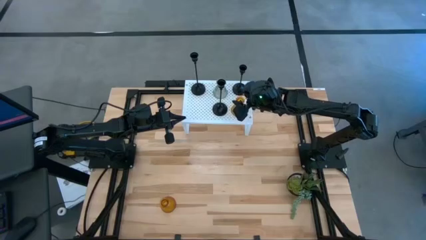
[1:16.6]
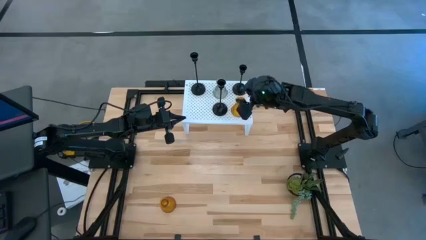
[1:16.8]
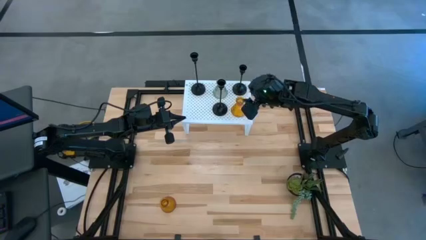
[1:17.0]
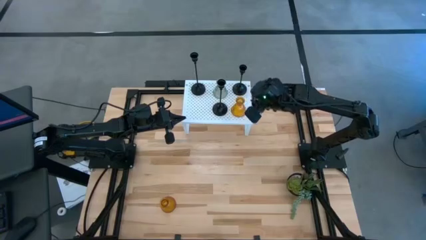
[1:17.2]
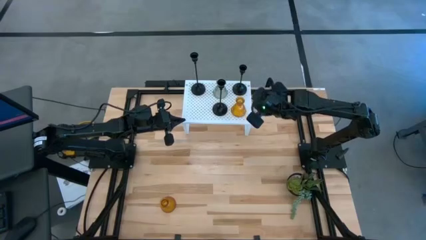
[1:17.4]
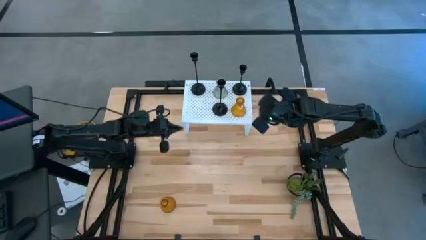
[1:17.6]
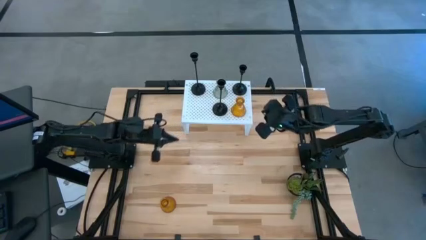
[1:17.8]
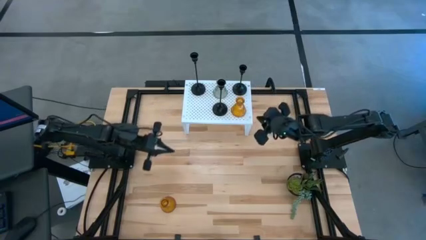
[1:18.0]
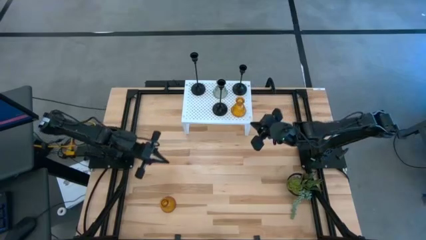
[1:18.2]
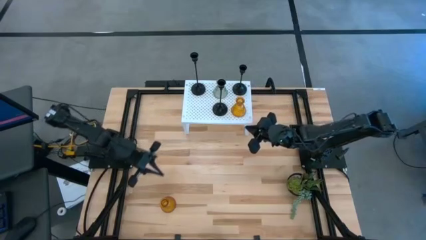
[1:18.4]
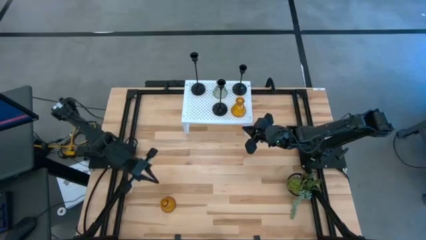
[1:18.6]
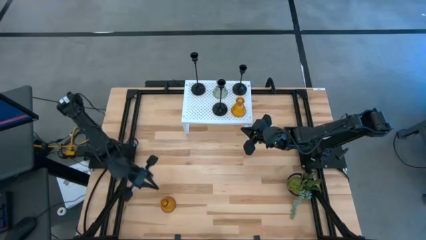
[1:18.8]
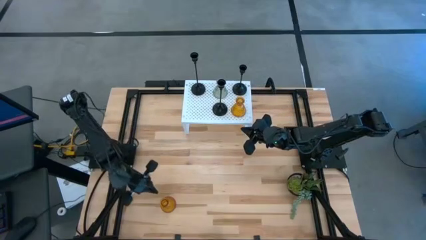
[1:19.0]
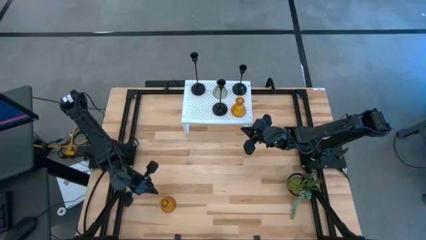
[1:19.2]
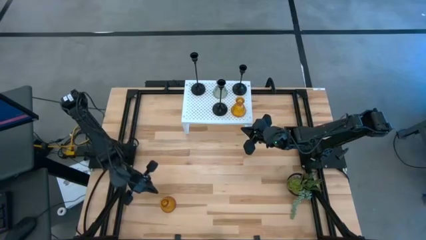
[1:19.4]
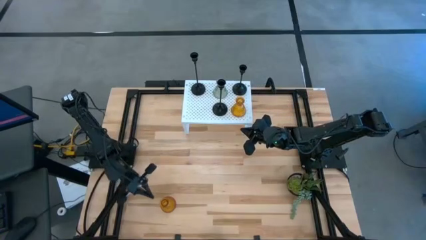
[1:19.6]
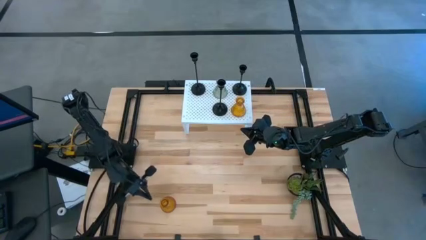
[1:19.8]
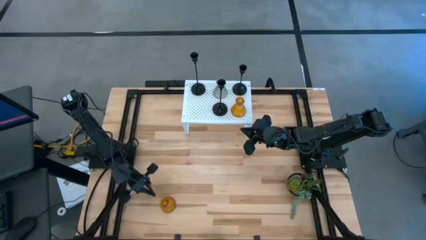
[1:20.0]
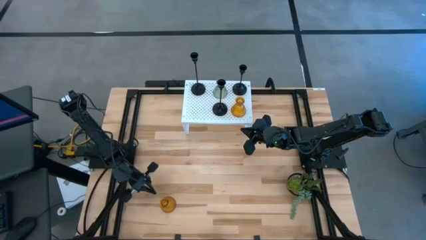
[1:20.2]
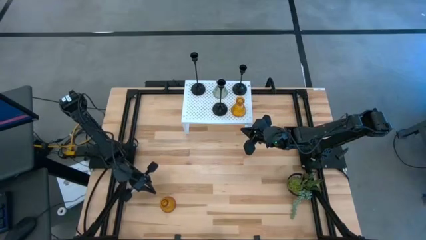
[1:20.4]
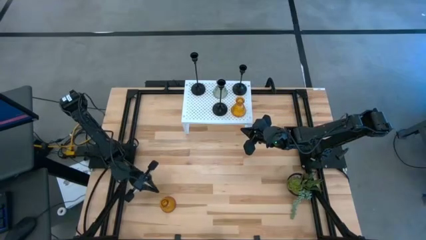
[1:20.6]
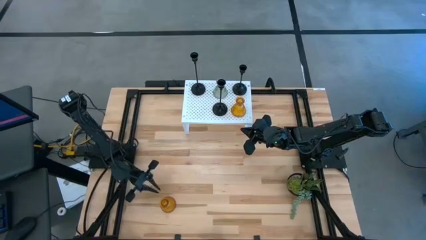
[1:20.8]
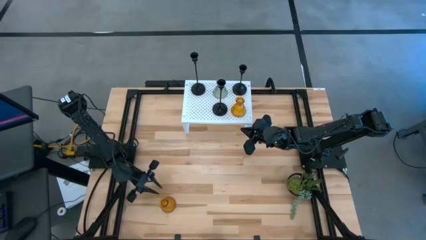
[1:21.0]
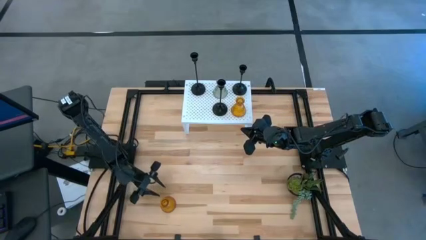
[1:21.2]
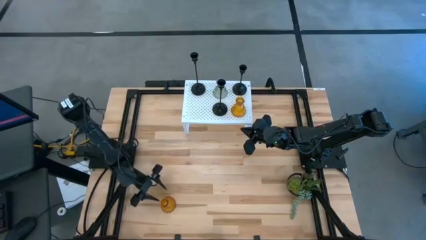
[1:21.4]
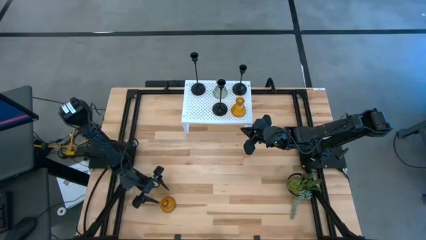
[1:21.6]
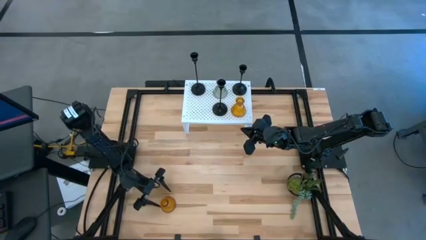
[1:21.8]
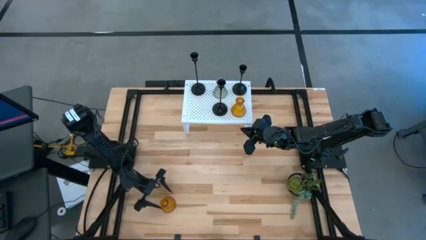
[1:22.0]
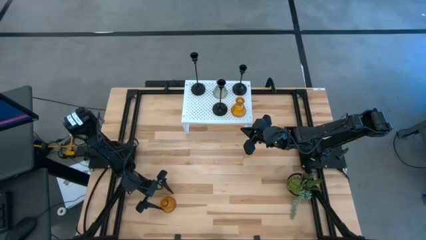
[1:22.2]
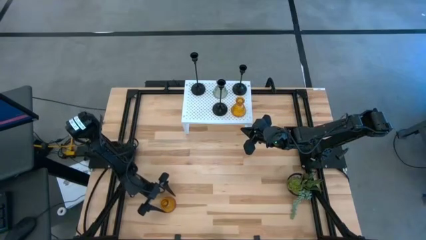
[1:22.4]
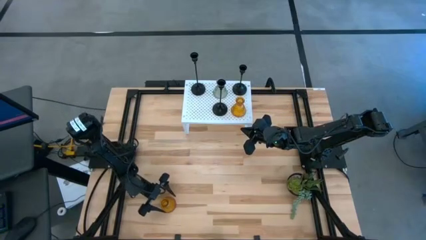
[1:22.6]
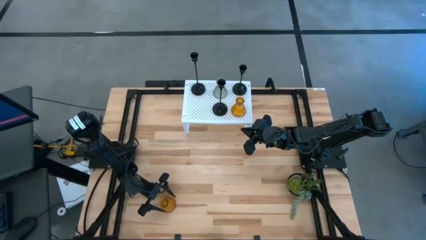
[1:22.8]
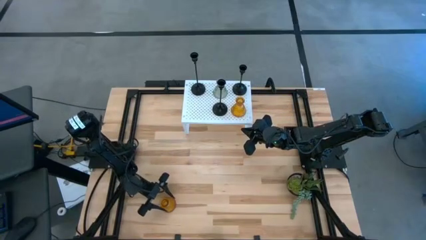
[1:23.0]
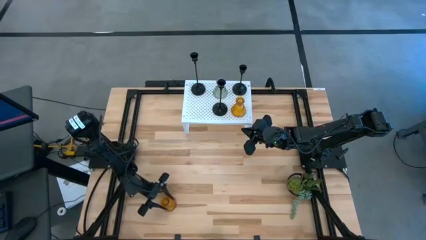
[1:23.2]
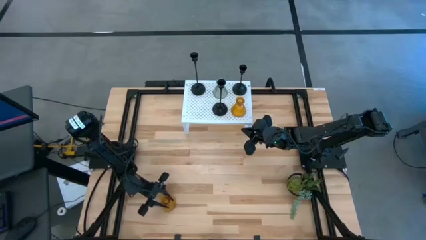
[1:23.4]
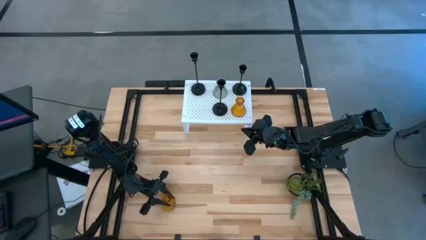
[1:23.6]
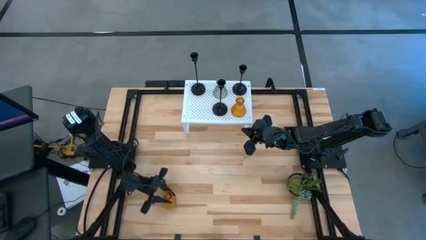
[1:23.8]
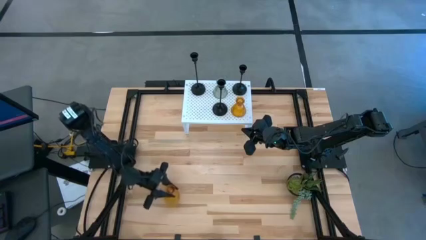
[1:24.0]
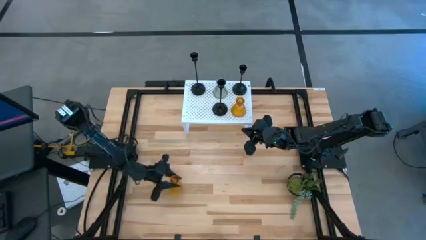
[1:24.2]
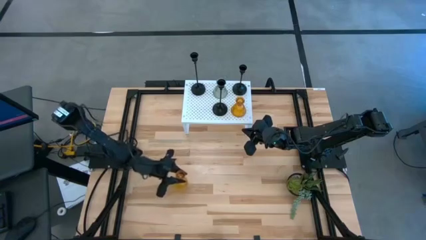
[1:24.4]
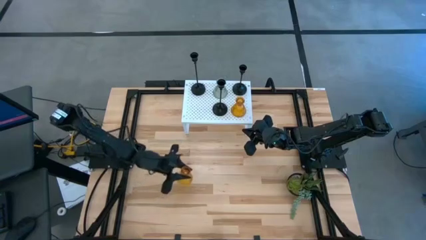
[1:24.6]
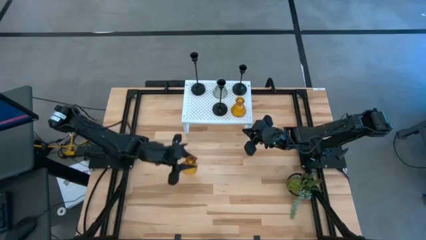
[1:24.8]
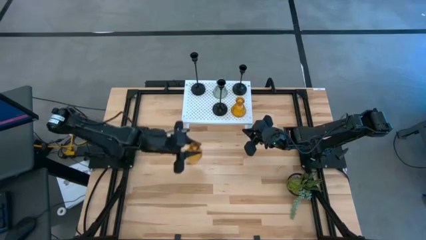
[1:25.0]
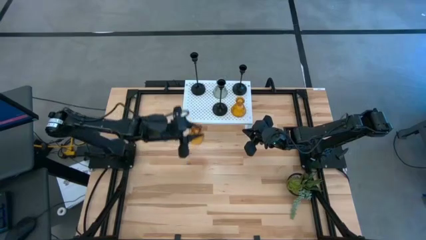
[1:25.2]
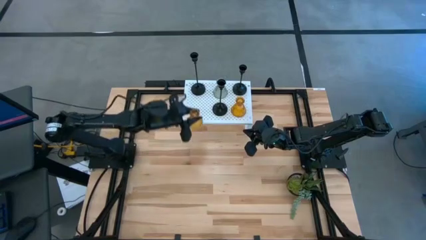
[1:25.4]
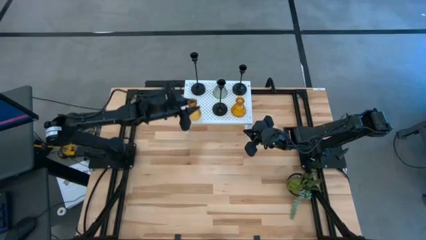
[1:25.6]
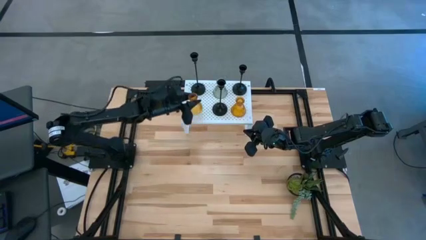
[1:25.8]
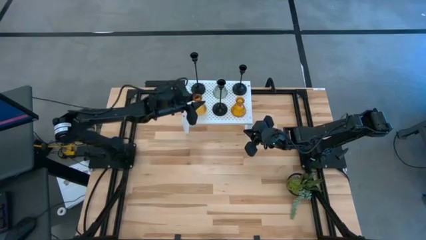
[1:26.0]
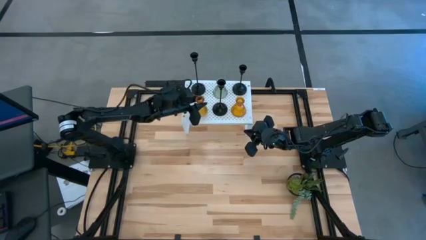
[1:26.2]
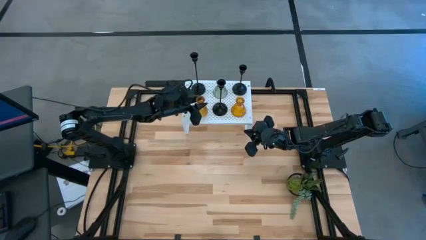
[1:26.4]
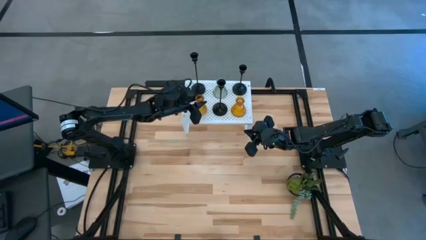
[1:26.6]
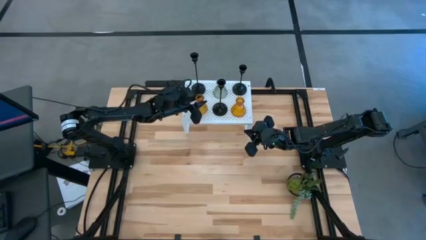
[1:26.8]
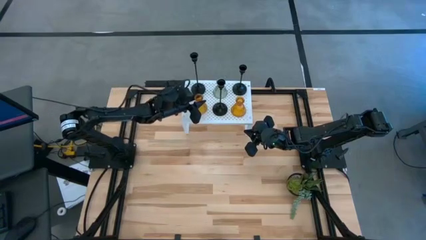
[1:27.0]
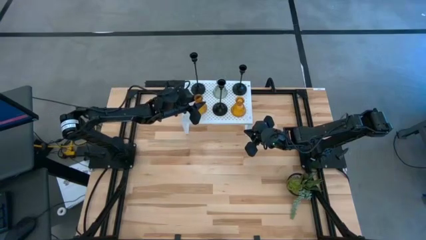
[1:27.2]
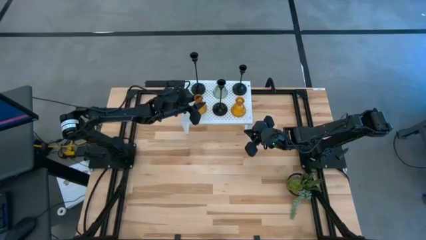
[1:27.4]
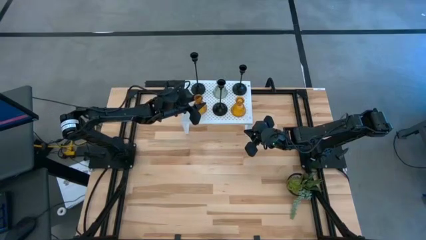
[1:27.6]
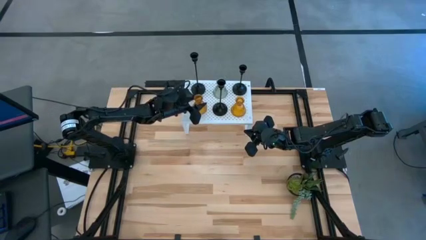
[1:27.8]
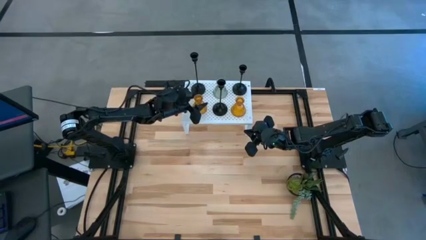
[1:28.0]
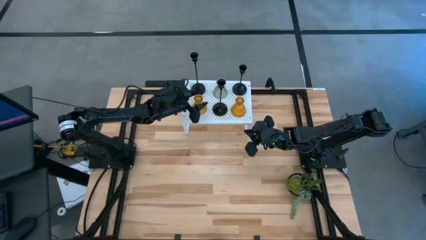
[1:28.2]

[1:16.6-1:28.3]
Task: Pick & Place candle stick holders
Put the yellow glass candle holder on the shelf

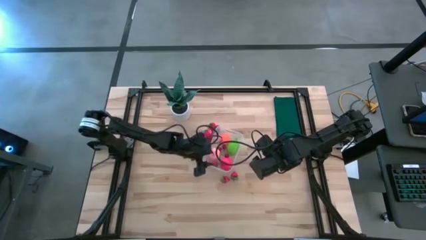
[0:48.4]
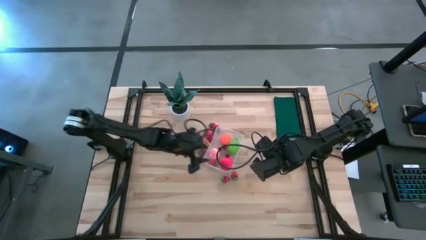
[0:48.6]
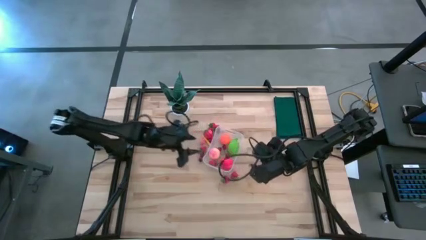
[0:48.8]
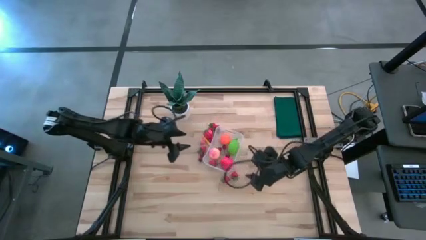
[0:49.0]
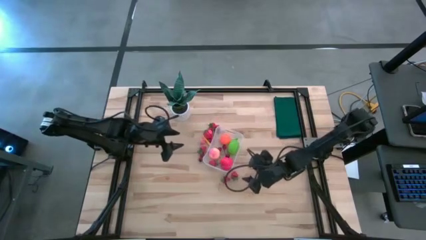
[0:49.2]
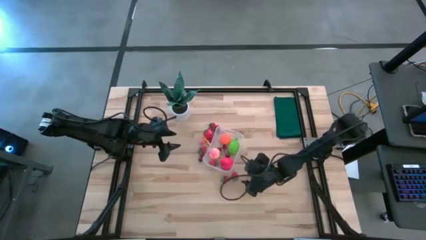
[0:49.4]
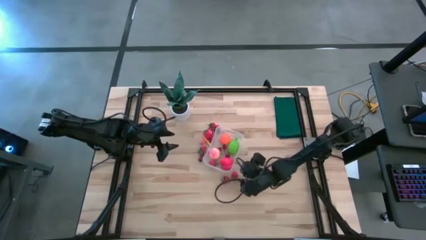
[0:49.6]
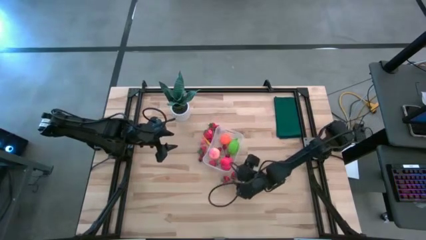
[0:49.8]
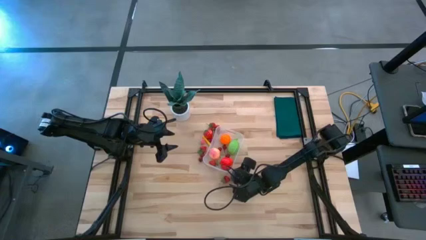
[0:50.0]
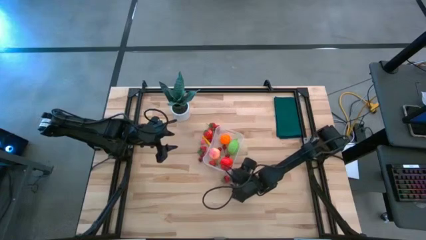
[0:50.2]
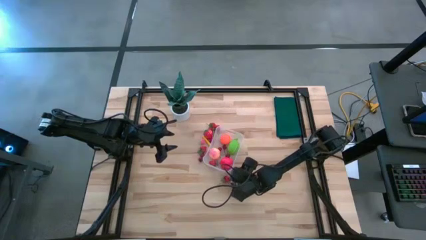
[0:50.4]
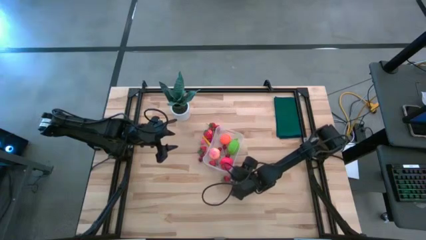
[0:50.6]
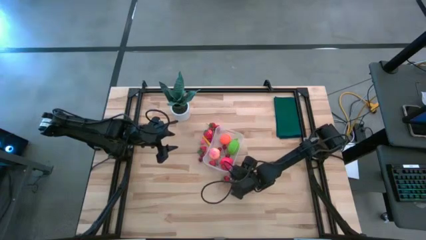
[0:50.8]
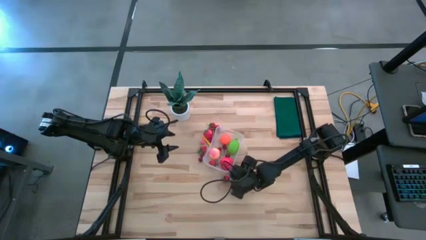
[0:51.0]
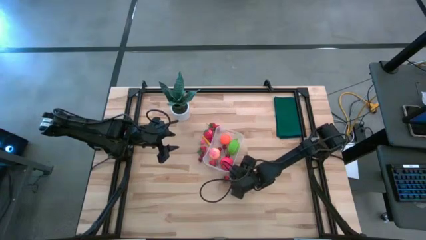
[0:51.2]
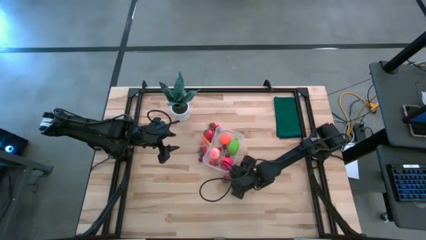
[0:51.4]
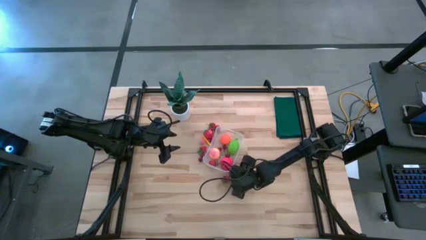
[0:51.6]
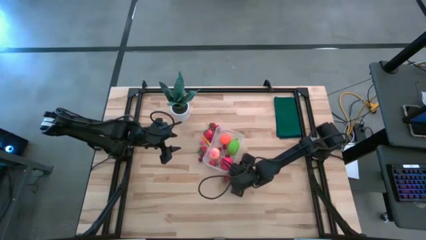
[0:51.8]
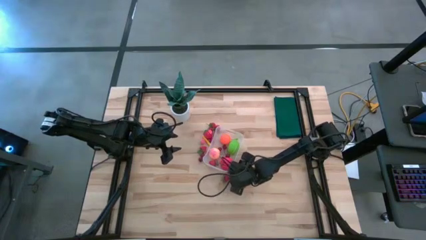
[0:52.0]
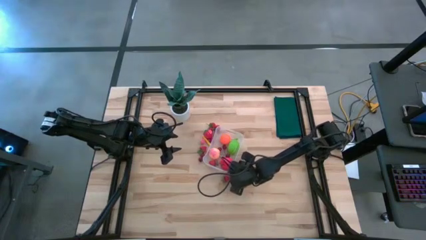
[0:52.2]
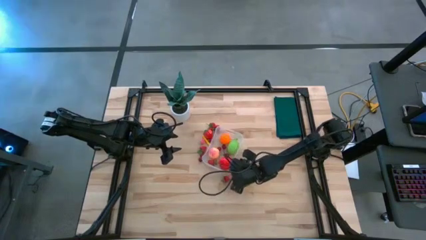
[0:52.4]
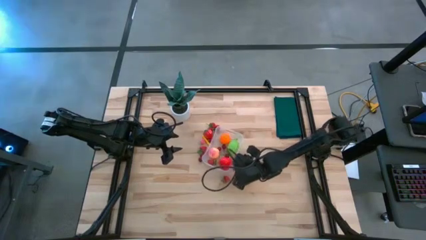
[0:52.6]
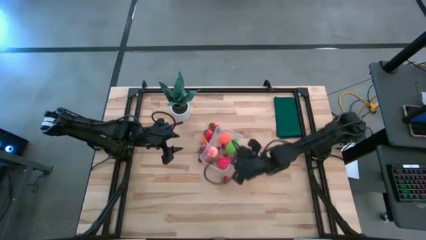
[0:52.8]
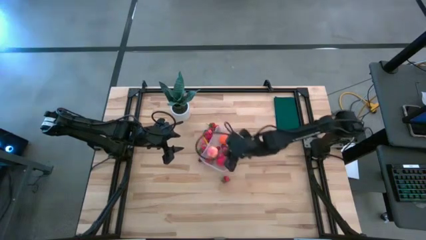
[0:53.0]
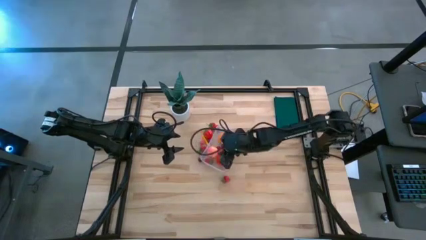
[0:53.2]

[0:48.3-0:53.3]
Task: Pick and placing Produce into tupperware
Put the red strawberry into the container
